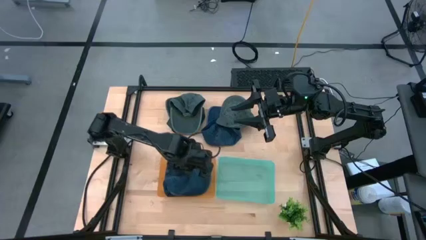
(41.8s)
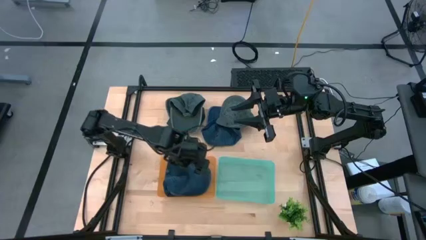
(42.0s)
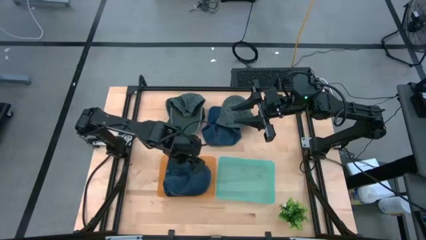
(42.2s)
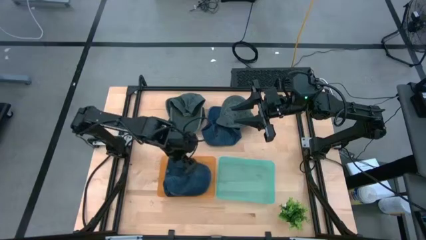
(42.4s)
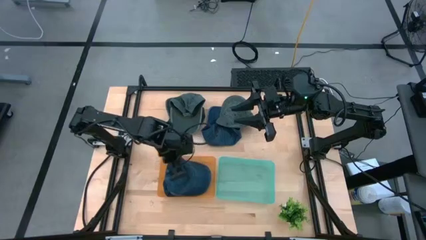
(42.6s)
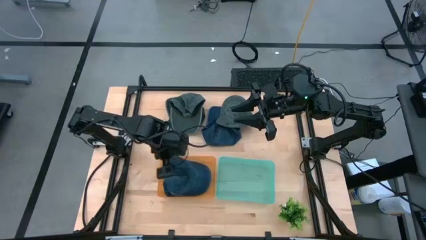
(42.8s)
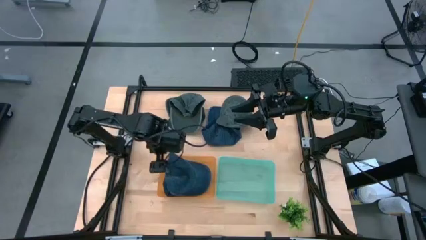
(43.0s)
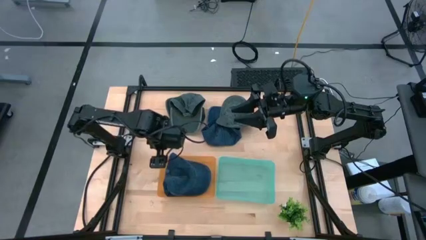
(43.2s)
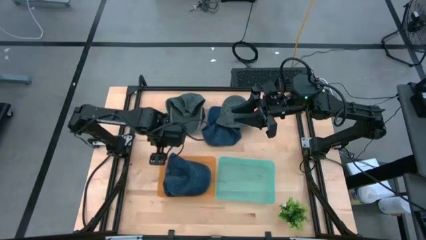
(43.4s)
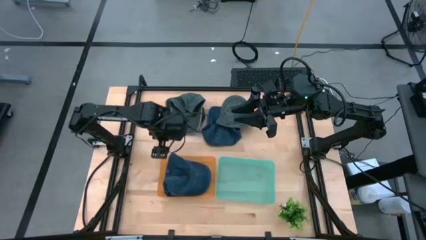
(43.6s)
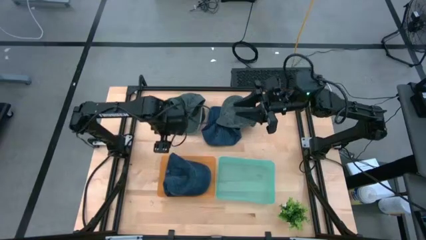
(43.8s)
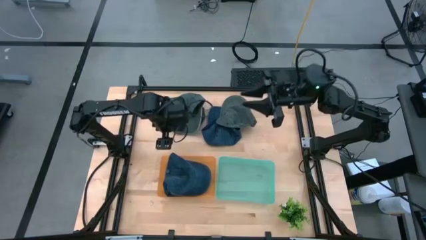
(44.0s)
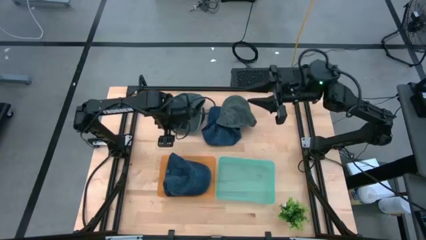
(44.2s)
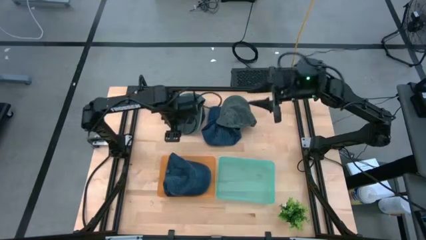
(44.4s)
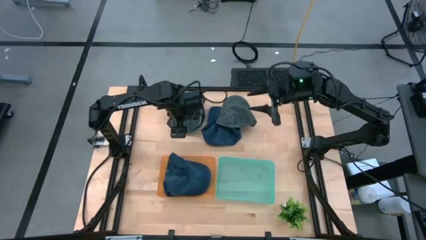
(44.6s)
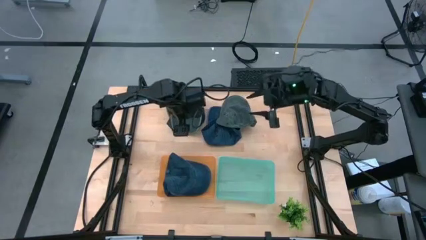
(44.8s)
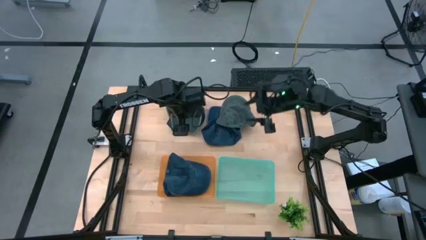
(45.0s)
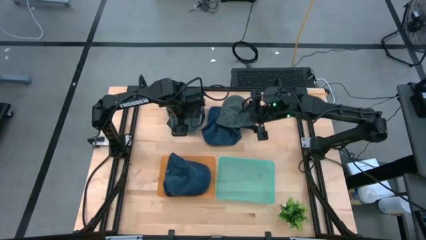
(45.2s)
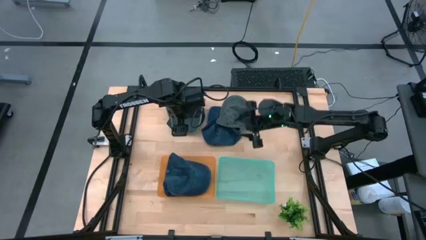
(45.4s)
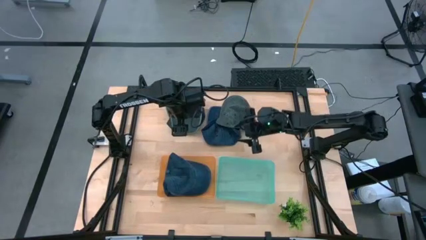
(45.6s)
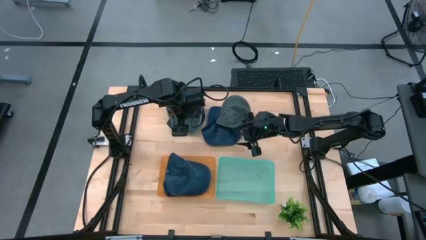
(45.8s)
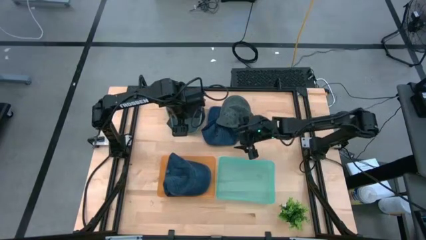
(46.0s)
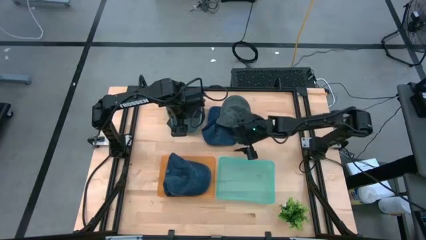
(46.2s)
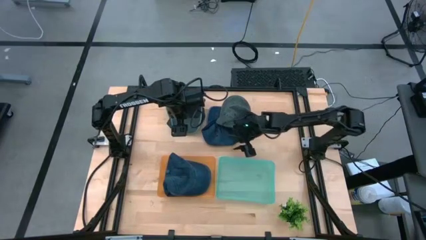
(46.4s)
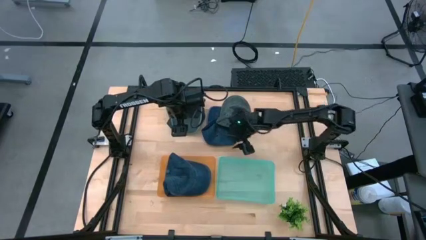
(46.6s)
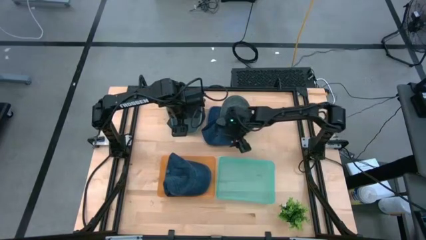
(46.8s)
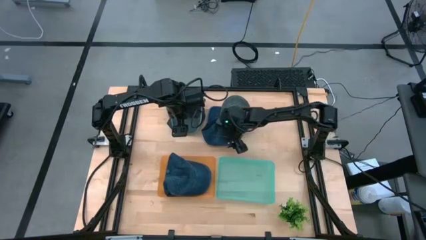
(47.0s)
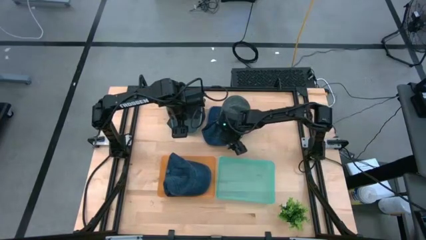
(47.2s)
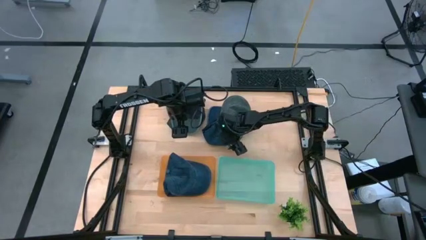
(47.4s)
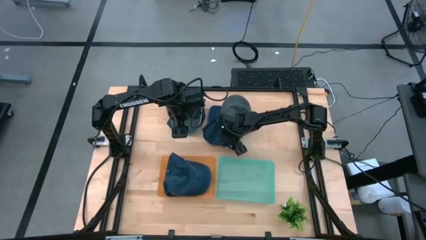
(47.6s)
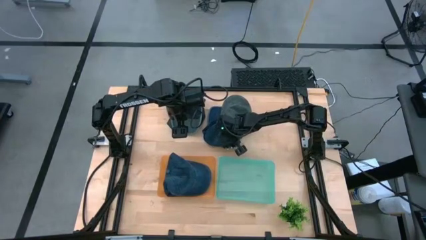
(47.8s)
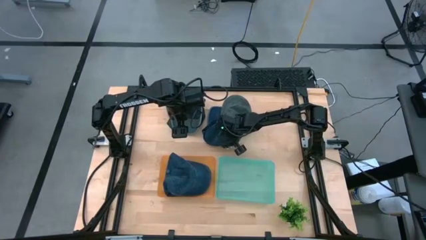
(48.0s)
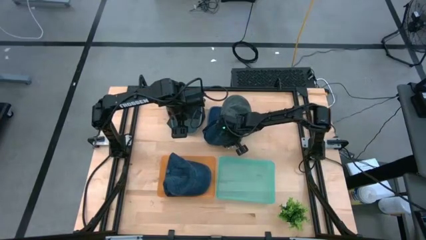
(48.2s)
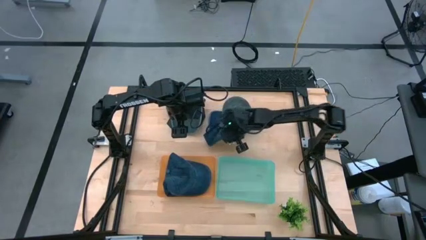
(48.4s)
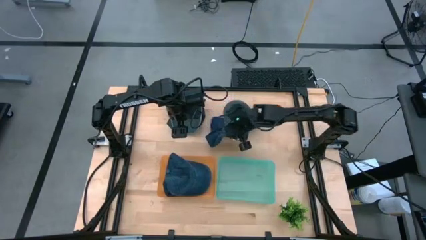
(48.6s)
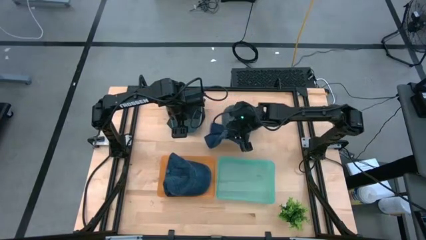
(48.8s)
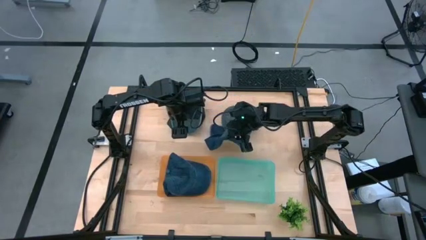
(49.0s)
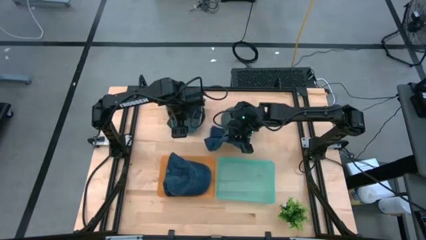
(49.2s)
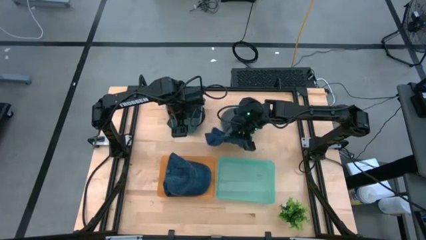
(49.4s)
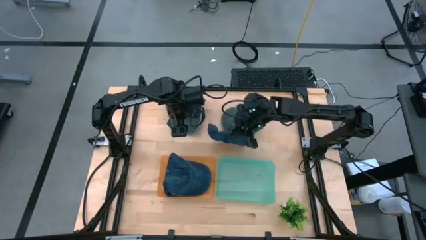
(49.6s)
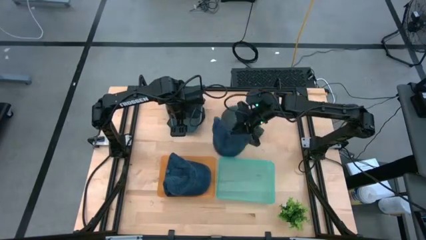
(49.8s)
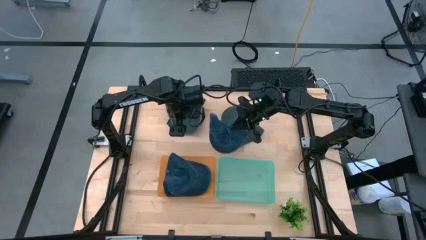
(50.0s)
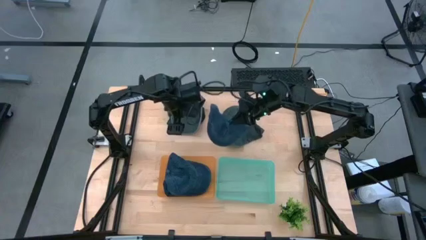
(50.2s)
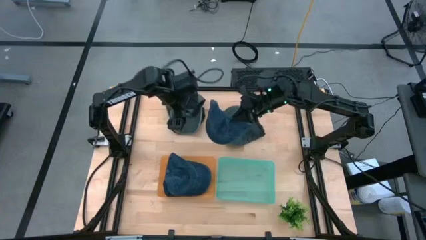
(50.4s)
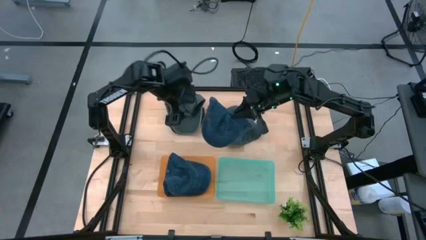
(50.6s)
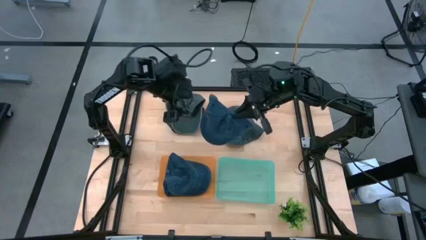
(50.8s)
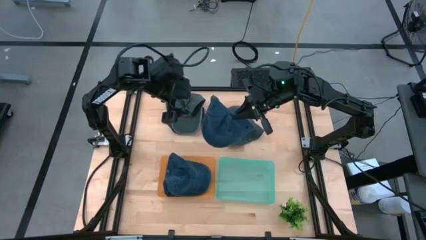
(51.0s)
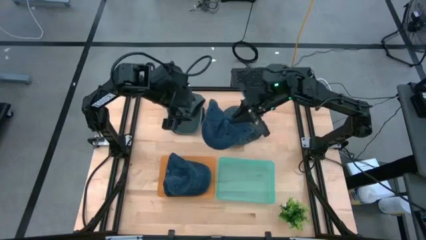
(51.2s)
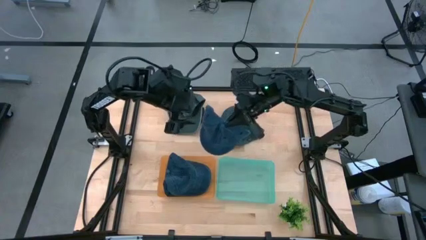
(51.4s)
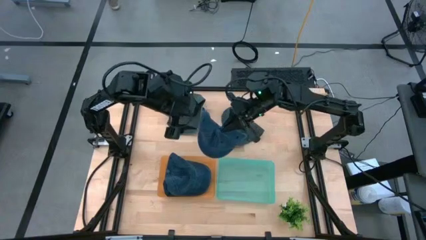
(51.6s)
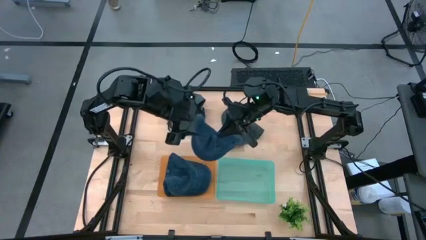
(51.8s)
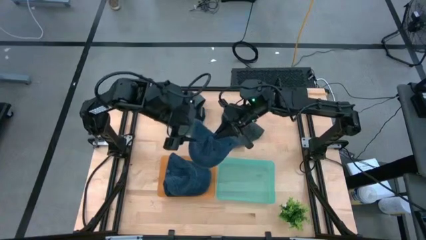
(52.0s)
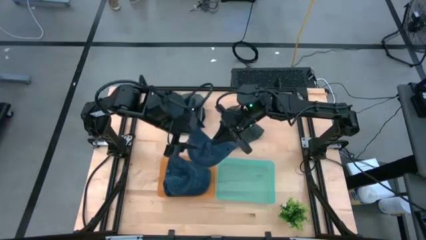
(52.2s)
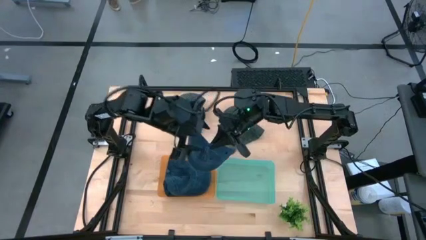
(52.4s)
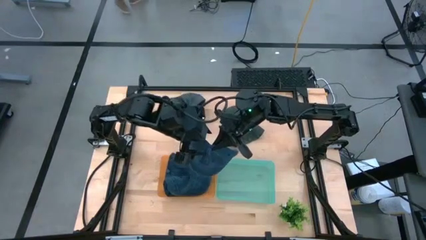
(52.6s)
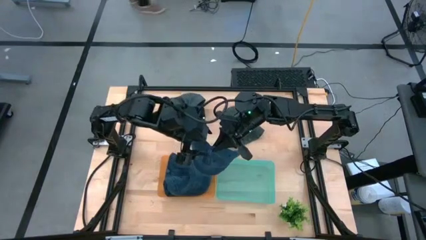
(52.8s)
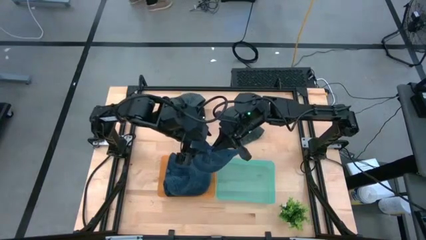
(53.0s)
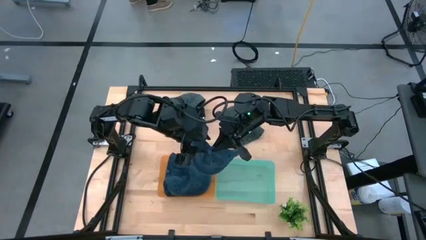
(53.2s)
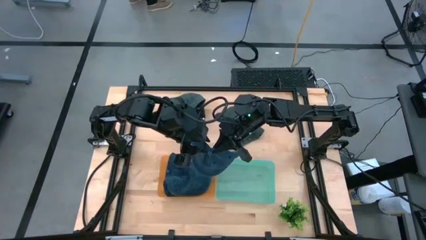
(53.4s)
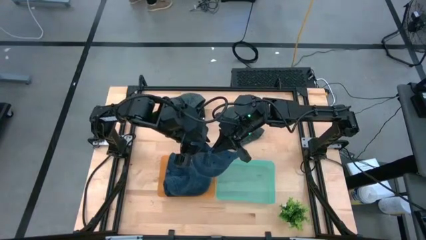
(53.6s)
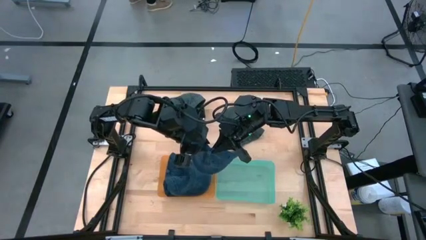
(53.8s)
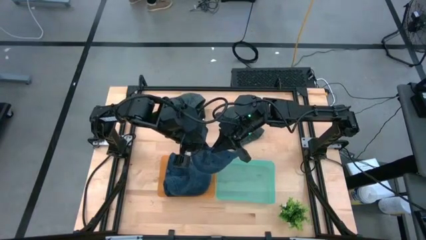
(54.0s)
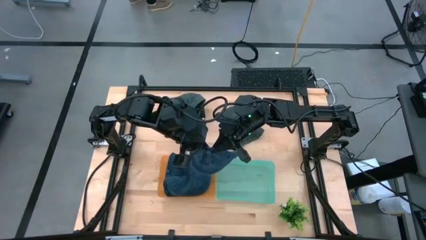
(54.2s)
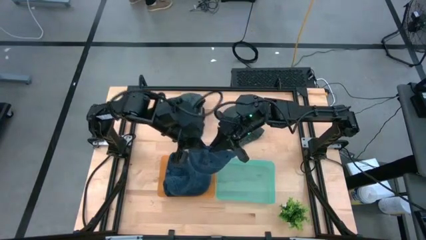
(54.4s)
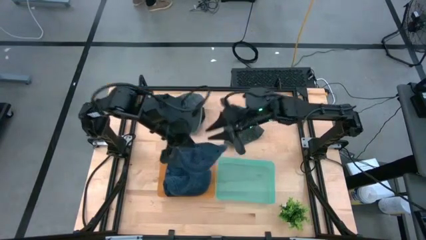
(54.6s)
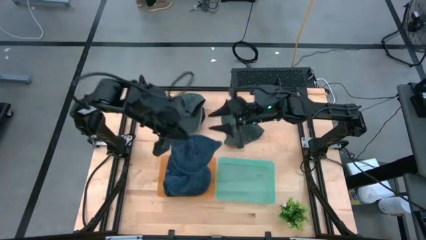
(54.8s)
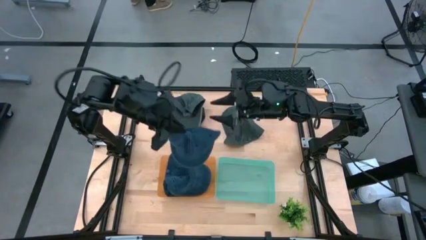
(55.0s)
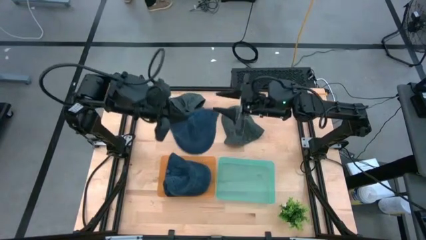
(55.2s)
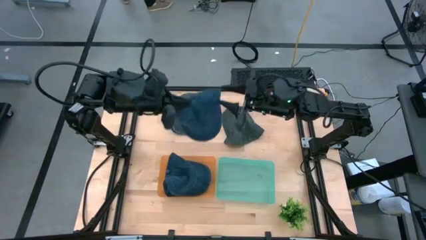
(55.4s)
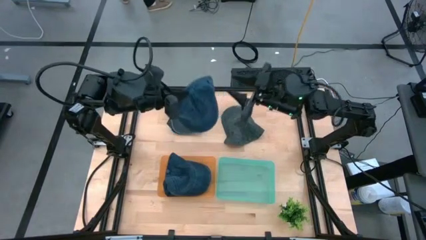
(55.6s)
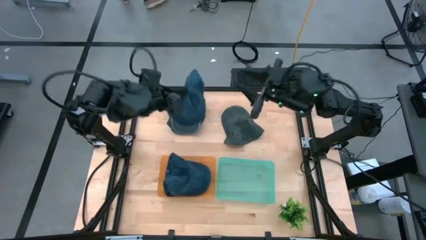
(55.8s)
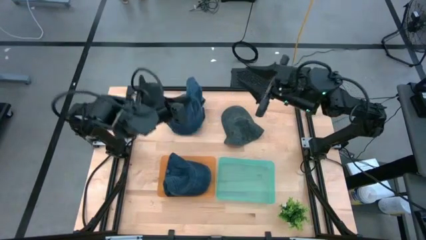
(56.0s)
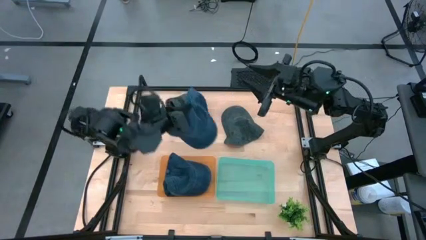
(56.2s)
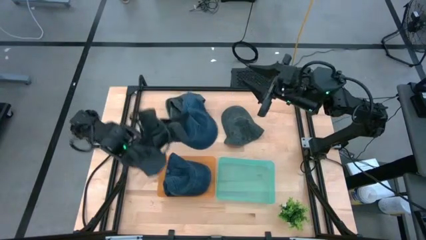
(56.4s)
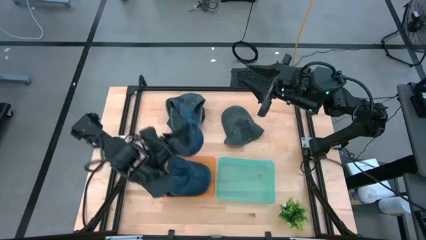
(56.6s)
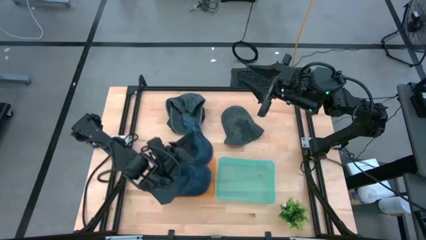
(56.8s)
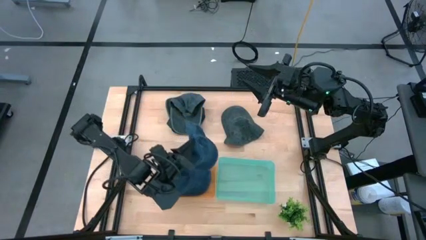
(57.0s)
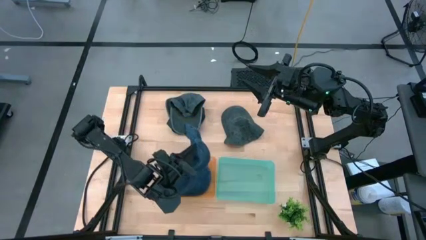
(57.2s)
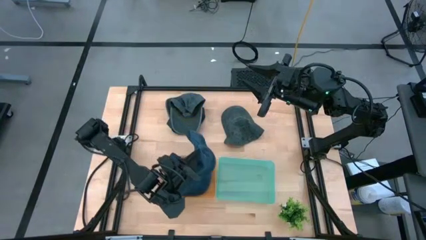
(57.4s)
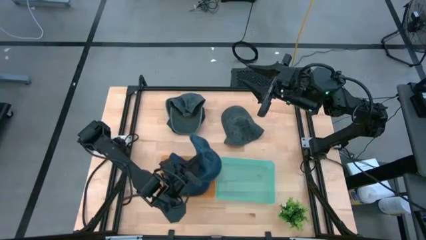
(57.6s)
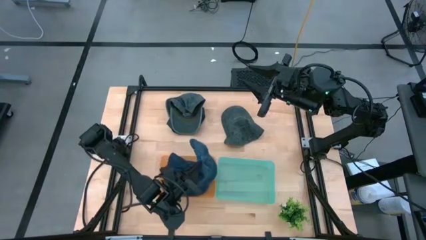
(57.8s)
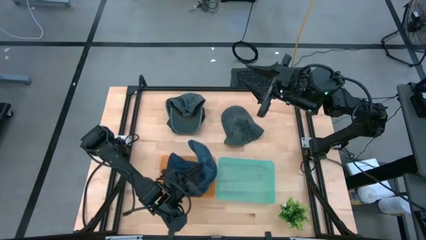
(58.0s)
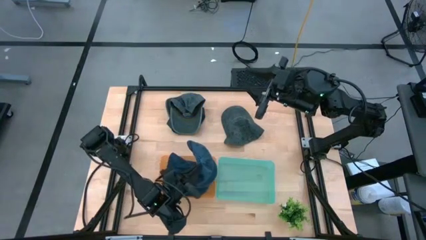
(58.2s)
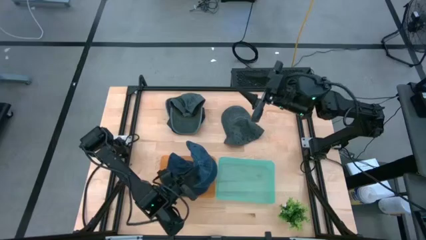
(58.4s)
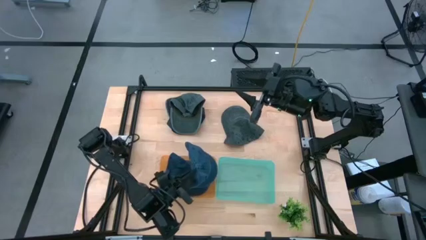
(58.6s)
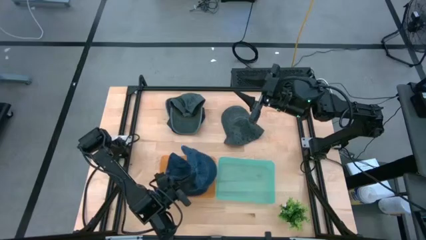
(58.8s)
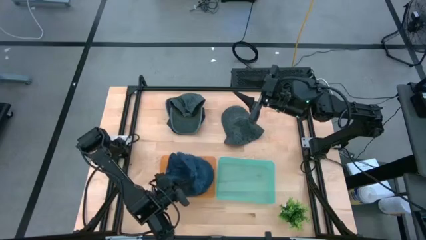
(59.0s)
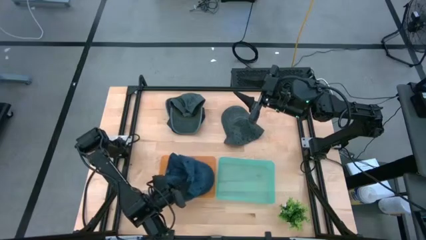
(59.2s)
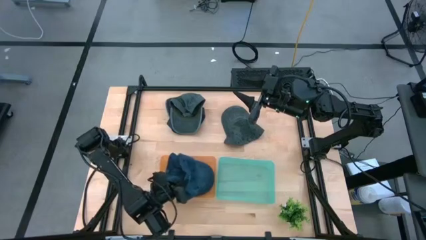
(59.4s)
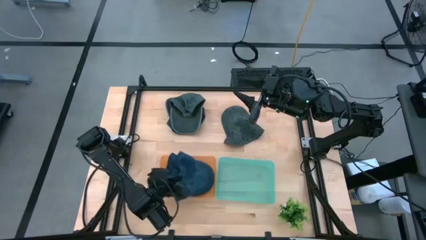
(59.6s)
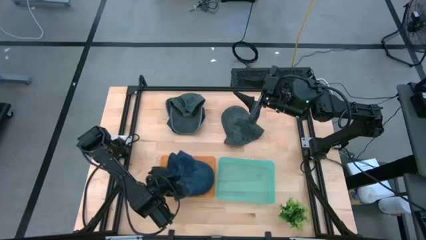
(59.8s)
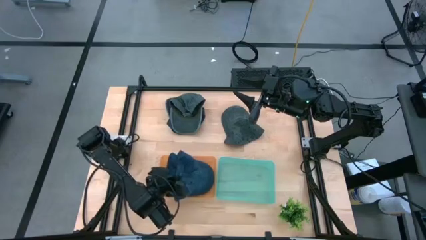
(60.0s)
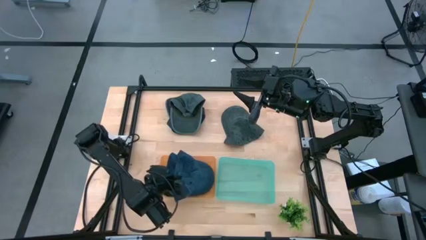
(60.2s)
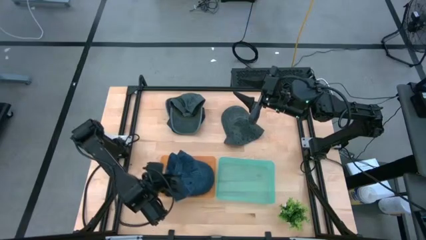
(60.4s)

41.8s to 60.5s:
Task: Pick & Place hat
Put the blue cap into the orange bin
